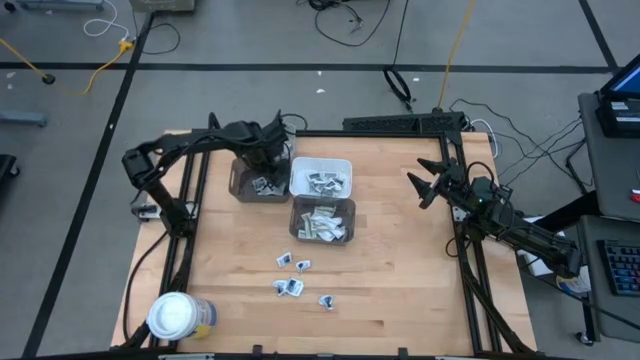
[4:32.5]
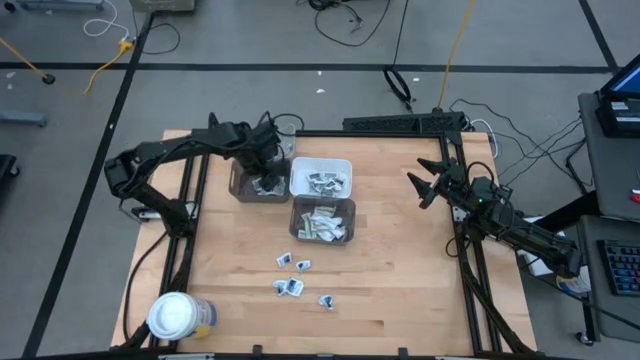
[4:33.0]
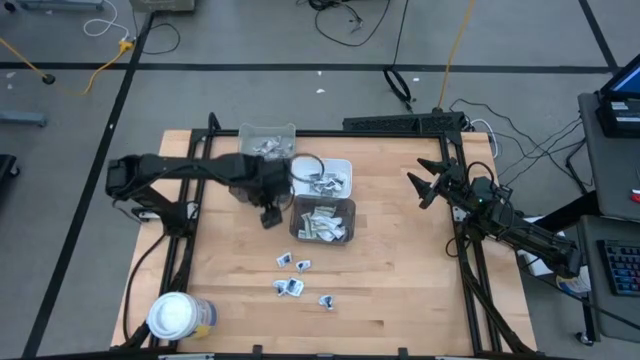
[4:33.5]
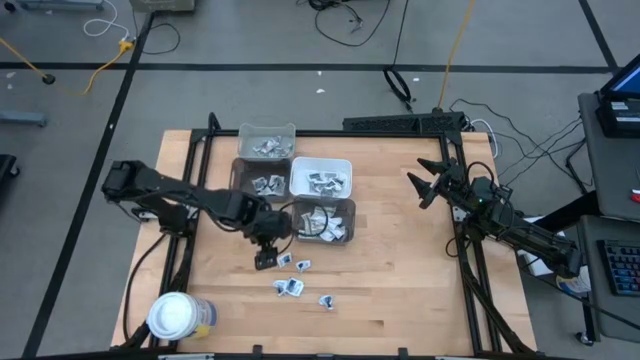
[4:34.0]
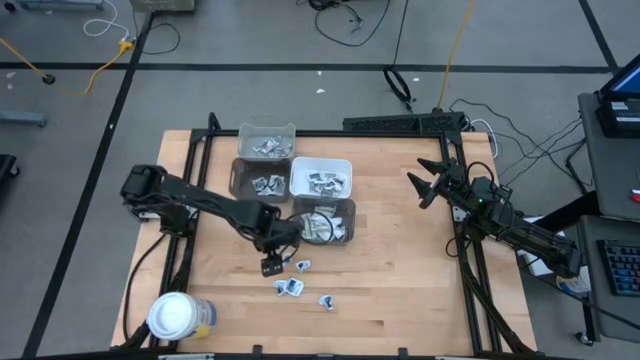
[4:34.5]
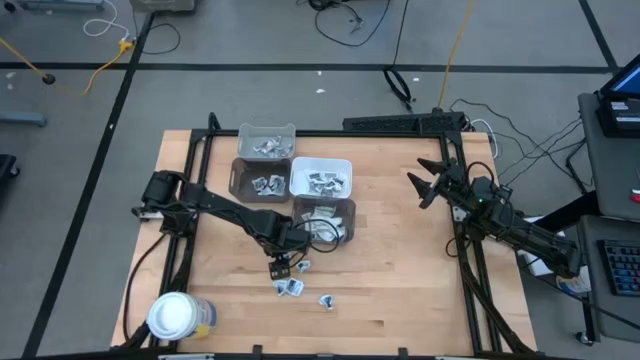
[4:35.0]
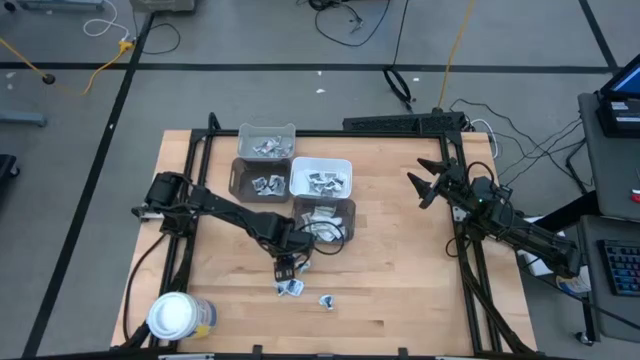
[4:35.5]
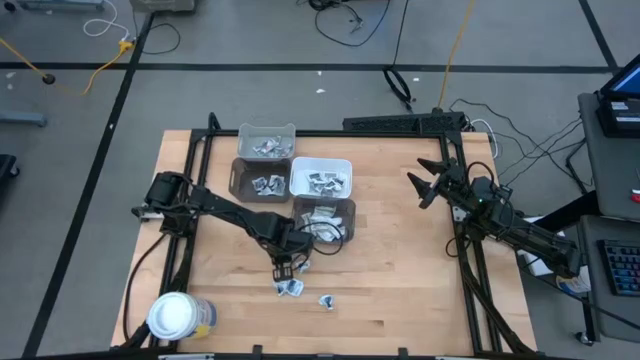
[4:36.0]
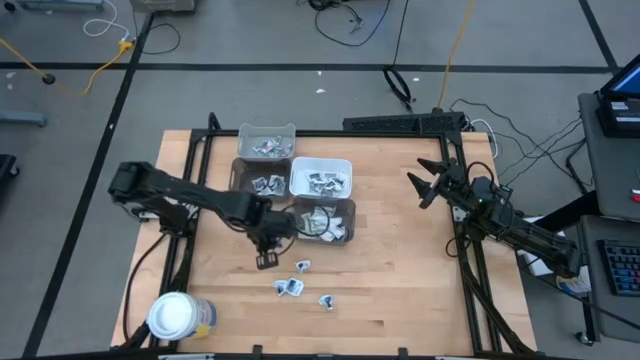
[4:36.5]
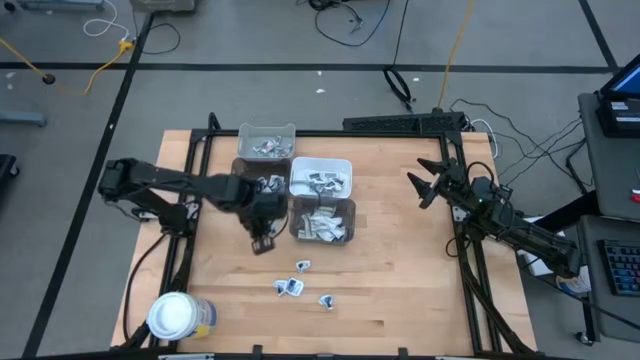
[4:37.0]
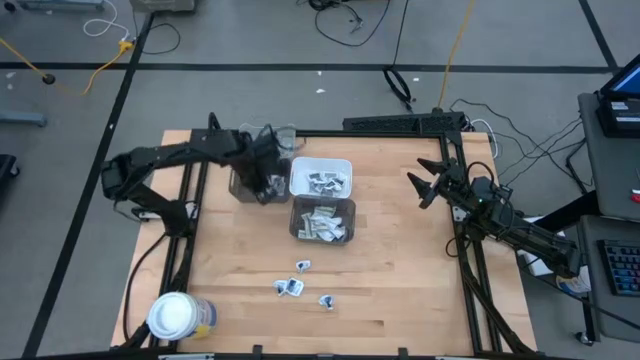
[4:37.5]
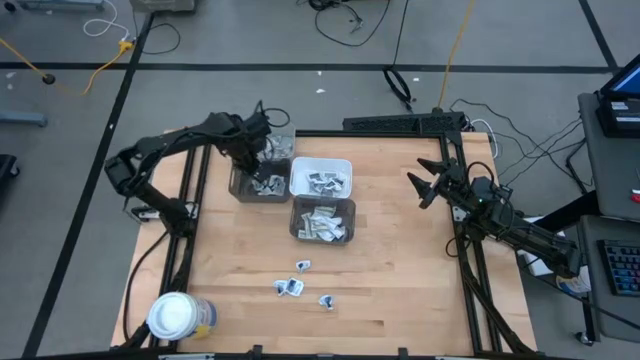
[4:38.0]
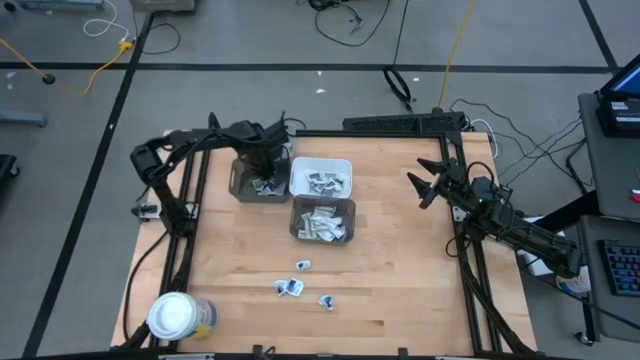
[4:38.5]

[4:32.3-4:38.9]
Task: Pick & Place First Aid Supplies
Put the blue alcohol pad into the left black bin

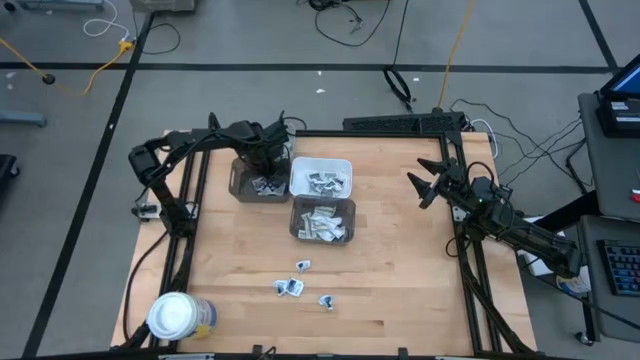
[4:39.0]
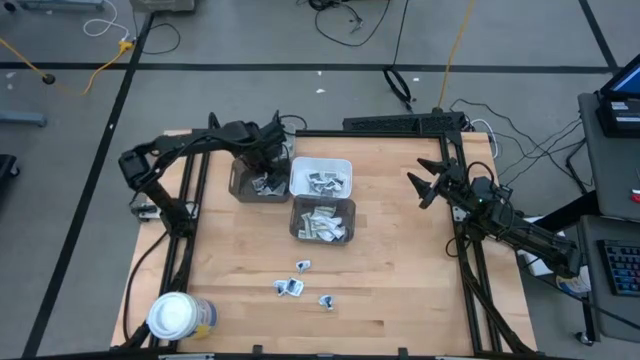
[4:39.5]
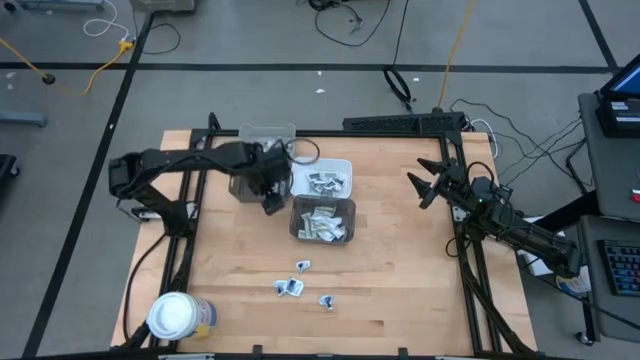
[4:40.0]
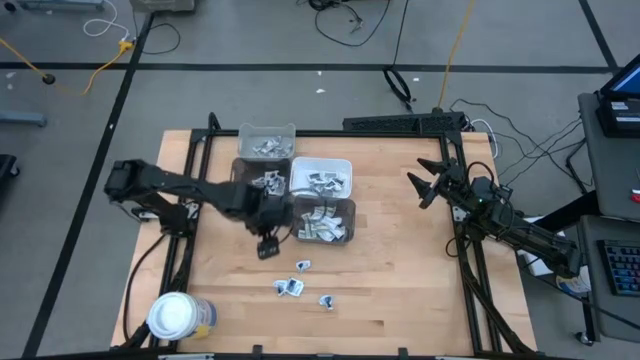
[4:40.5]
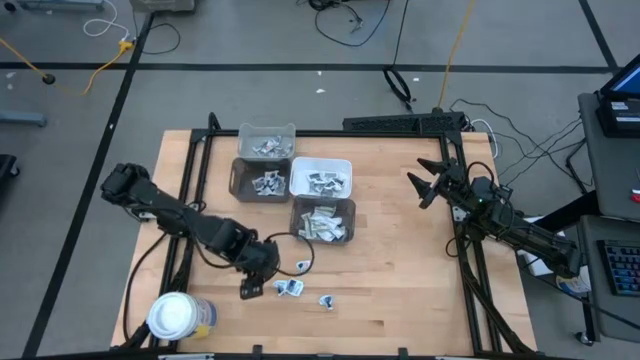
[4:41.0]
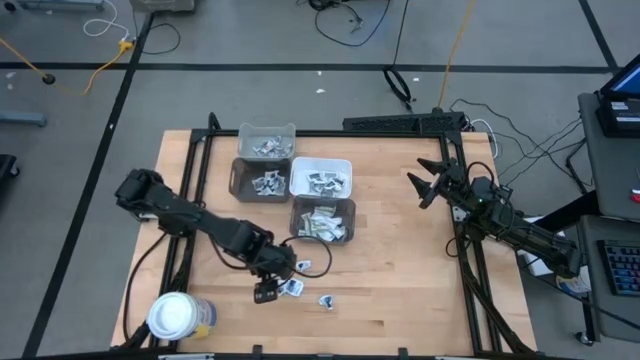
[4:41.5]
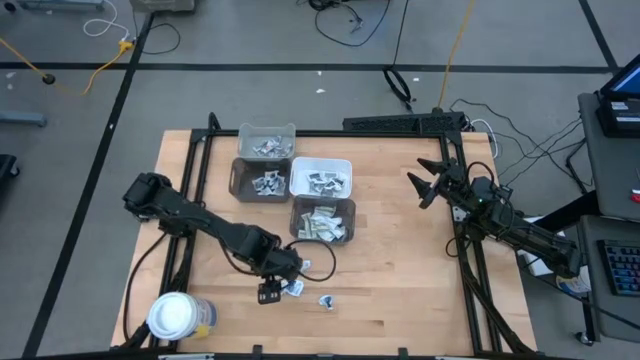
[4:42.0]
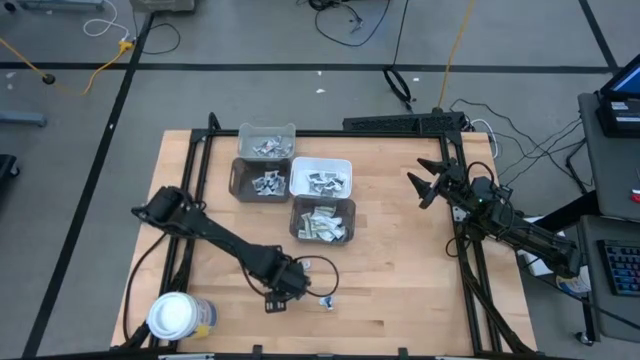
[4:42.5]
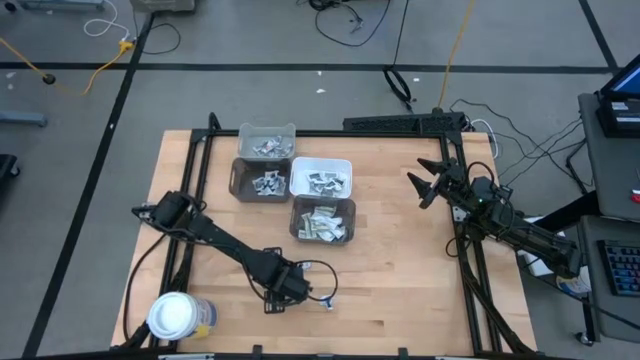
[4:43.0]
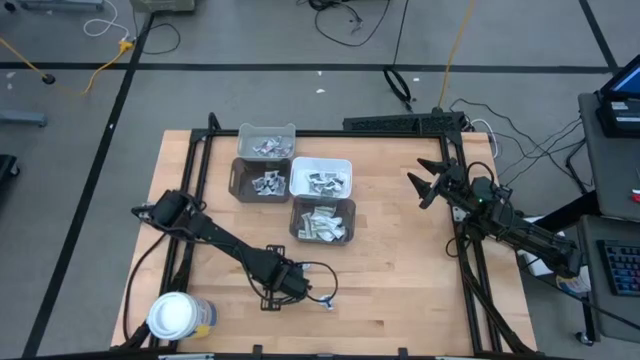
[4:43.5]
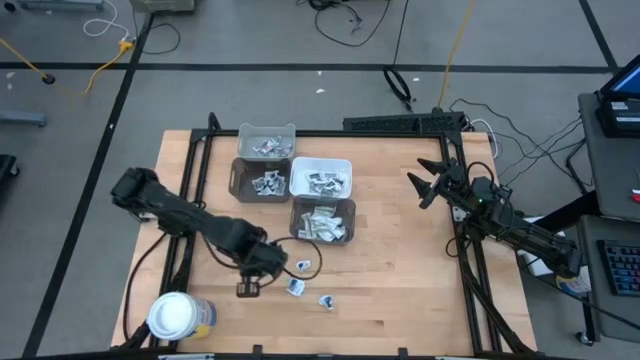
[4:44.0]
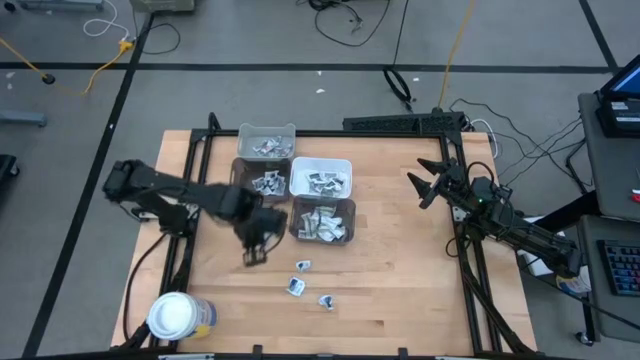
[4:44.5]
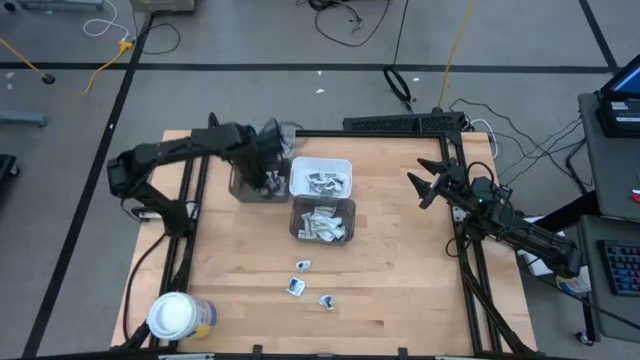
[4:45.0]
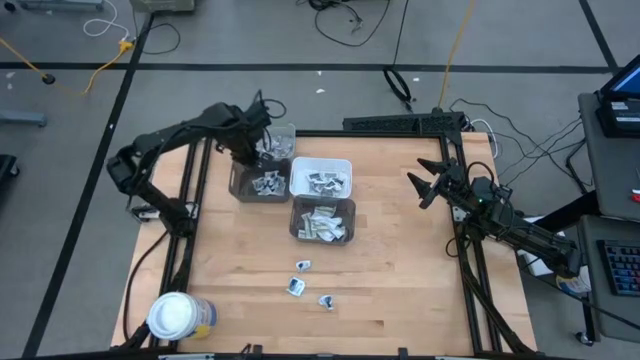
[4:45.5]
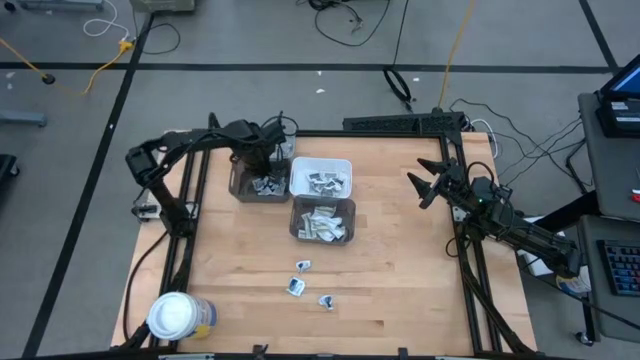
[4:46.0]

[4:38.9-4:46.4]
Put the blue alcohol pad into the left black bin

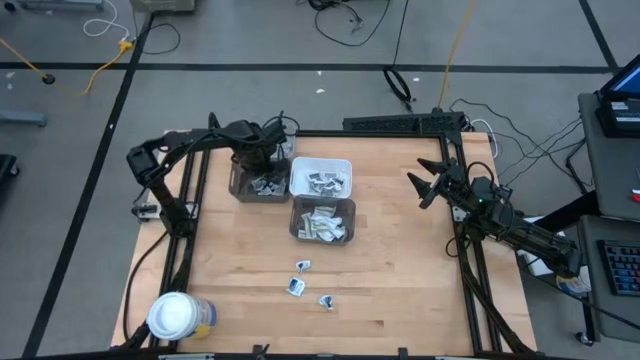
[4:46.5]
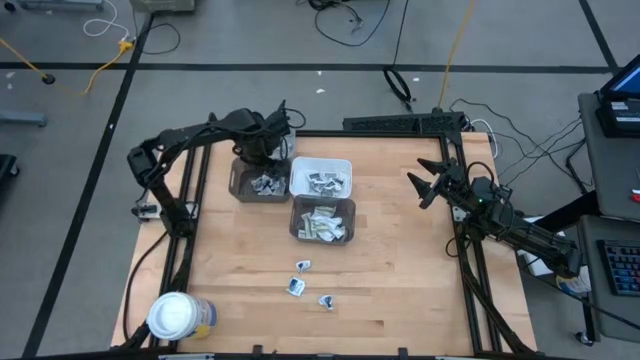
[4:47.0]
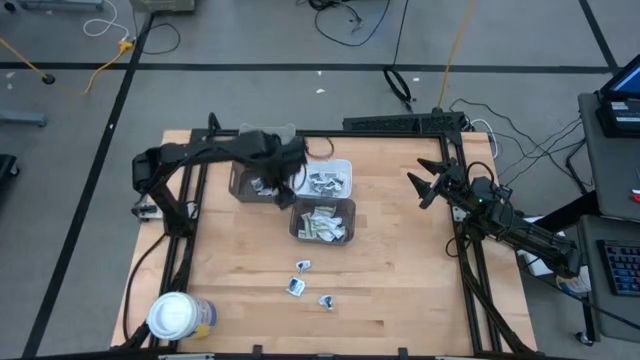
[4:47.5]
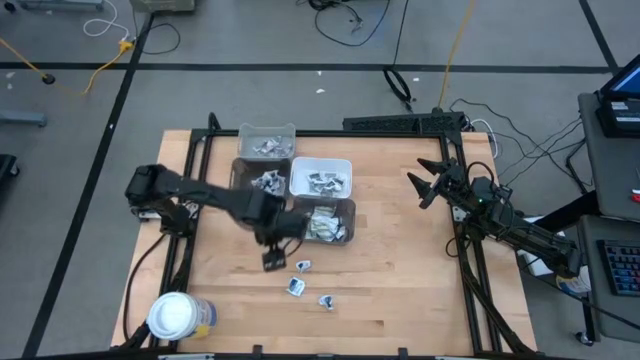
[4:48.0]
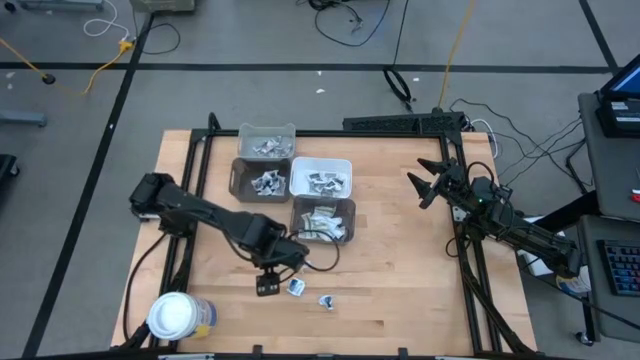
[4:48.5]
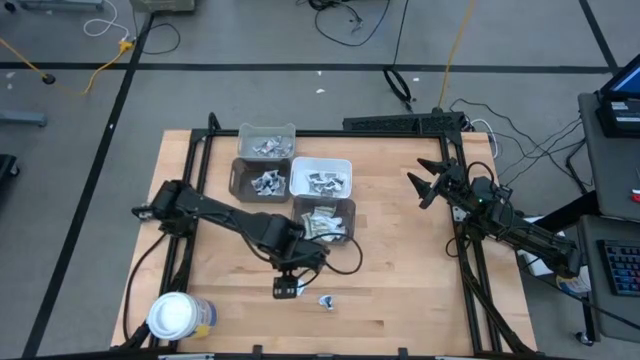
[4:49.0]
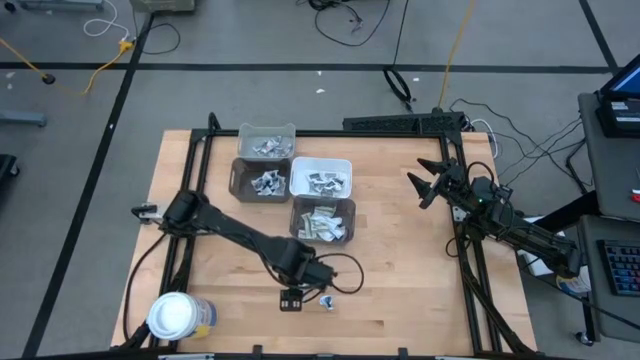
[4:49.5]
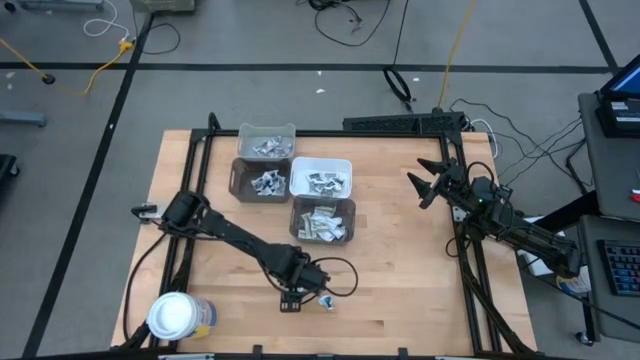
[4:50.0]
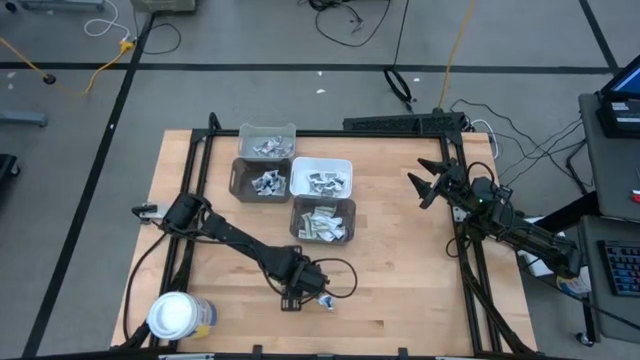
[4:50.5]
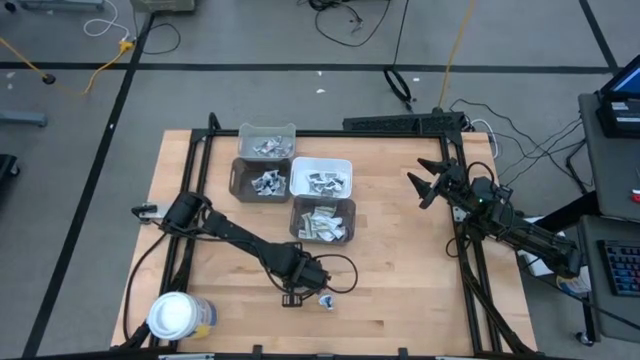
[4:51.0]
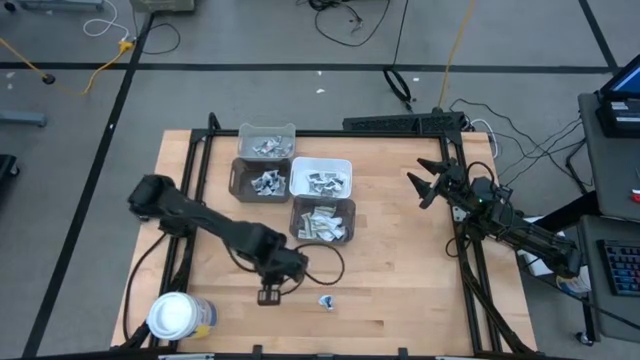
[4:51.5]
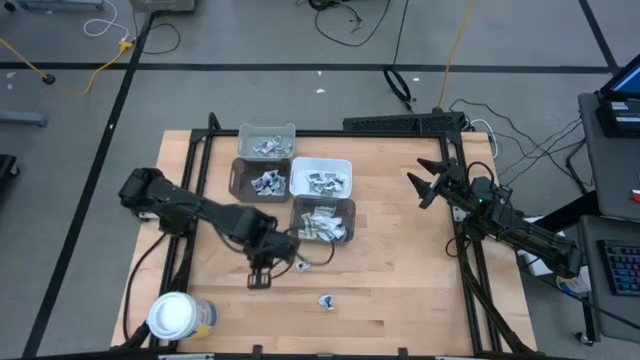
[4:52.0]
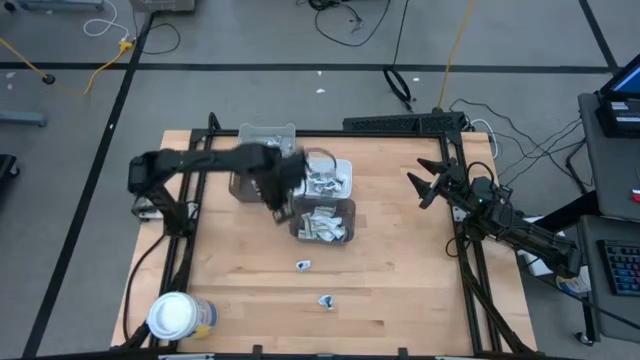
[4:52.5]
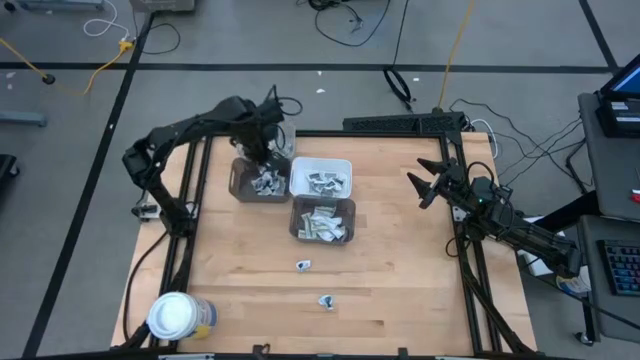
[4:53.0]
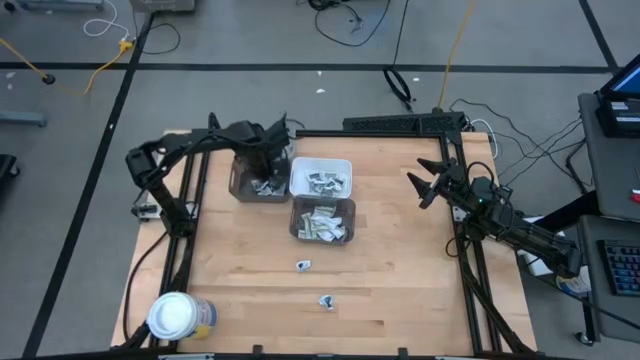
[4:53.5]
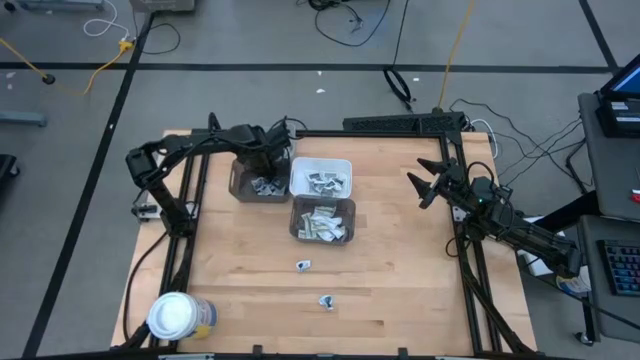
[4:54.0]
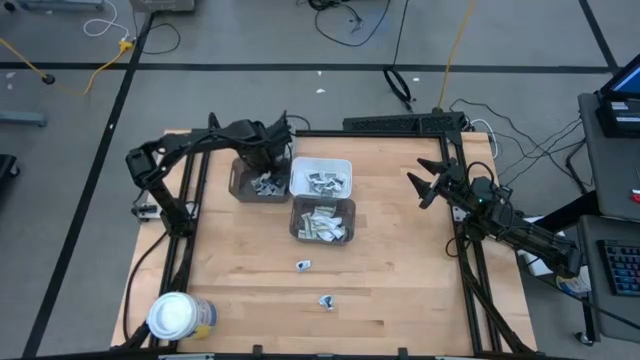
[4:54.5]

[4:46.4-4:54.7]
Put the blue alcohol pad into the left black bin
